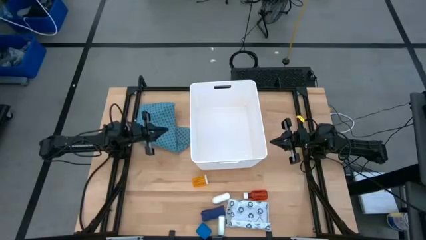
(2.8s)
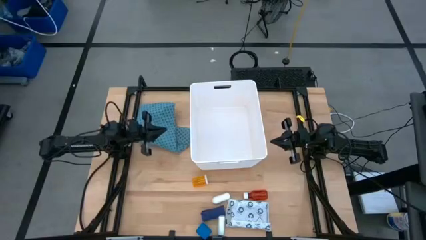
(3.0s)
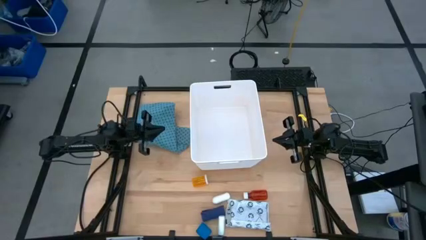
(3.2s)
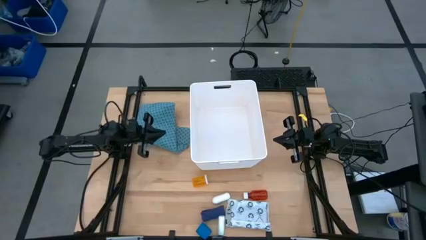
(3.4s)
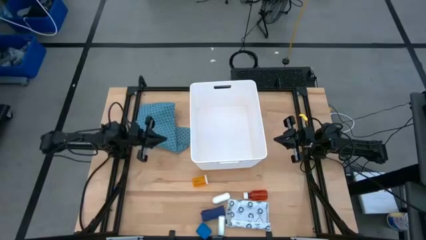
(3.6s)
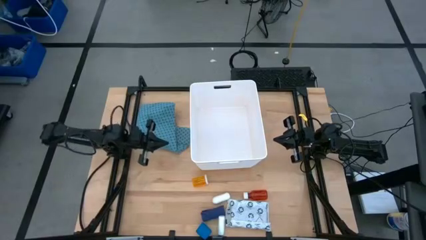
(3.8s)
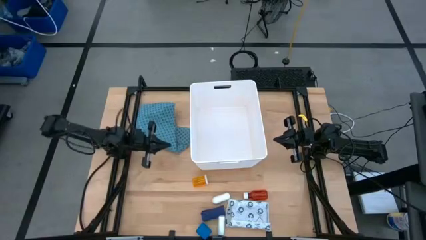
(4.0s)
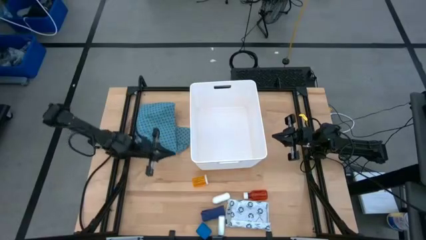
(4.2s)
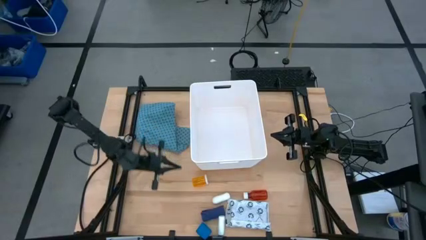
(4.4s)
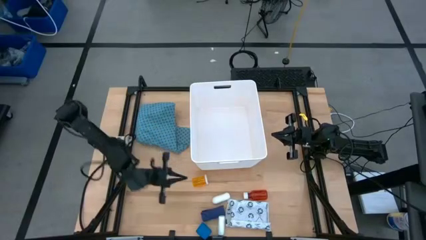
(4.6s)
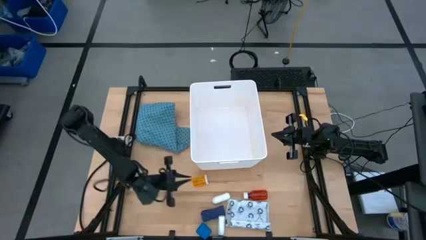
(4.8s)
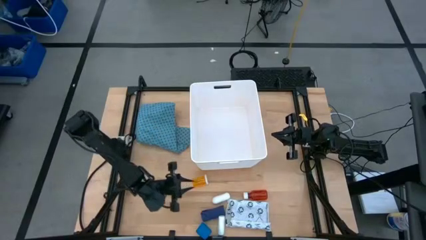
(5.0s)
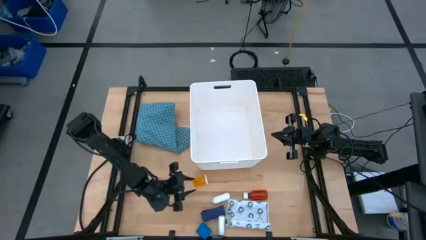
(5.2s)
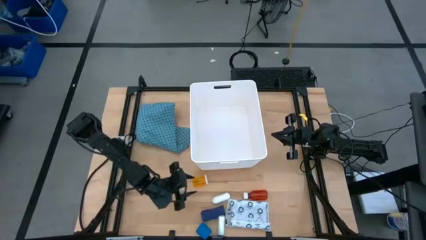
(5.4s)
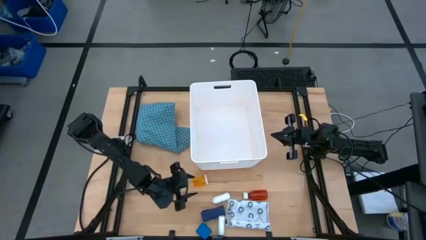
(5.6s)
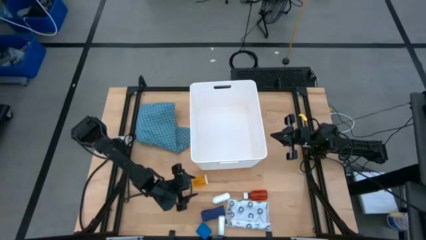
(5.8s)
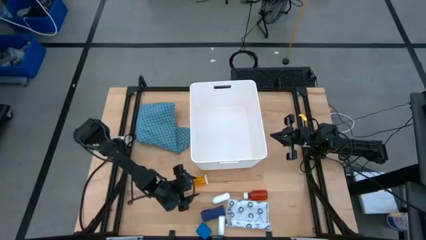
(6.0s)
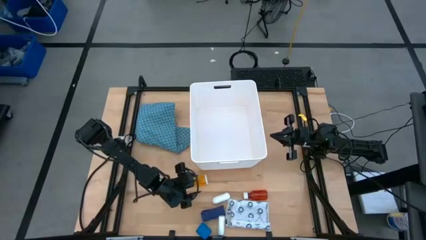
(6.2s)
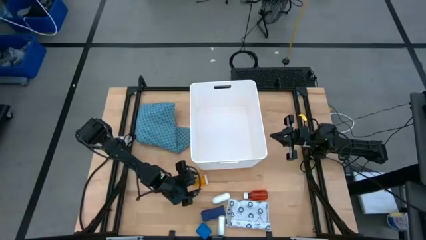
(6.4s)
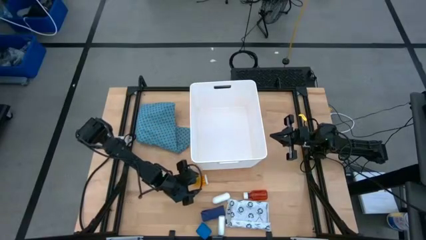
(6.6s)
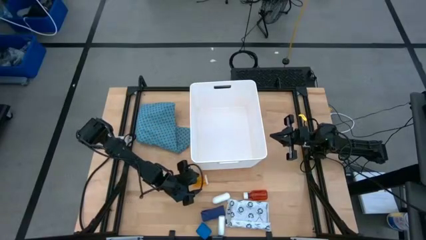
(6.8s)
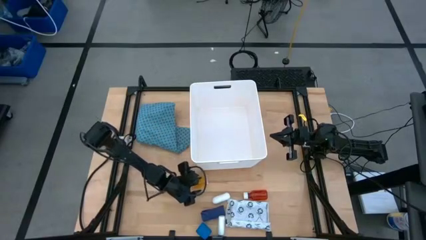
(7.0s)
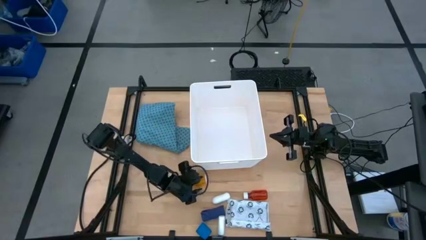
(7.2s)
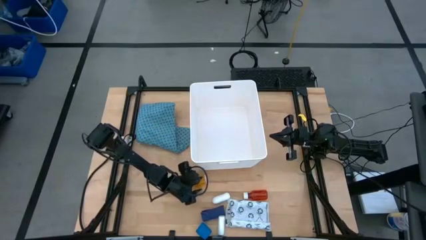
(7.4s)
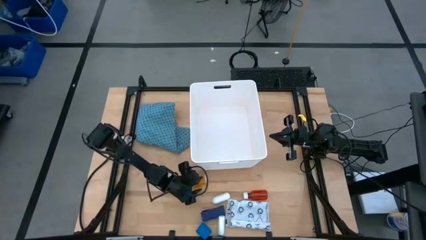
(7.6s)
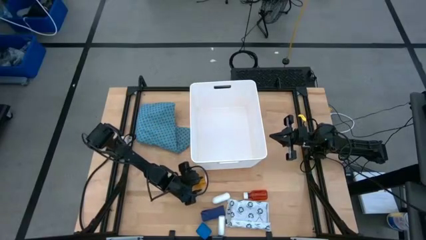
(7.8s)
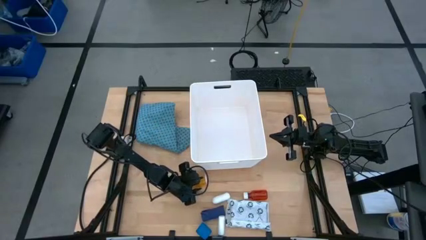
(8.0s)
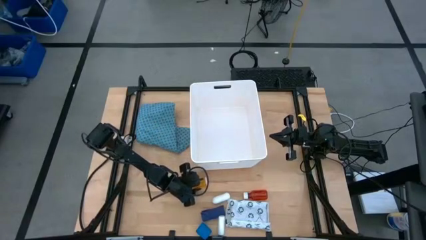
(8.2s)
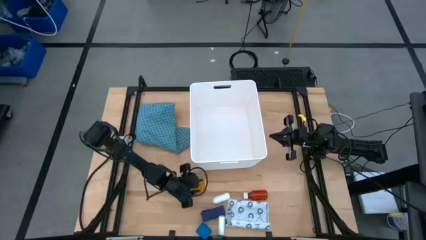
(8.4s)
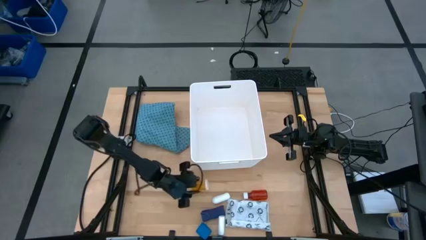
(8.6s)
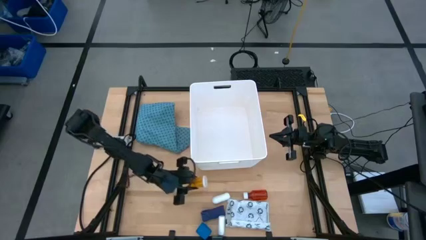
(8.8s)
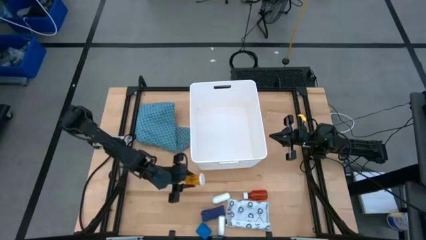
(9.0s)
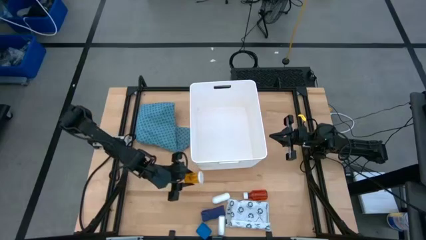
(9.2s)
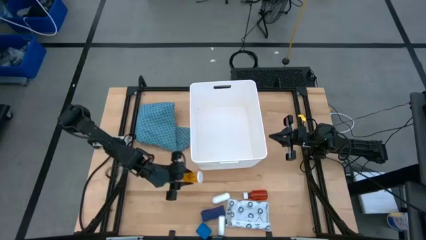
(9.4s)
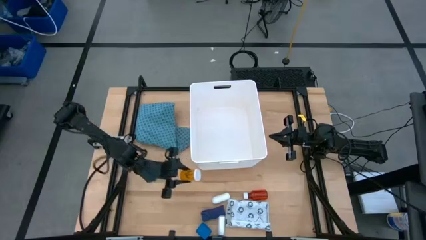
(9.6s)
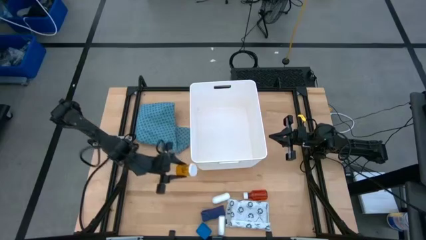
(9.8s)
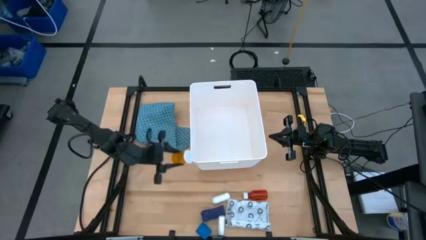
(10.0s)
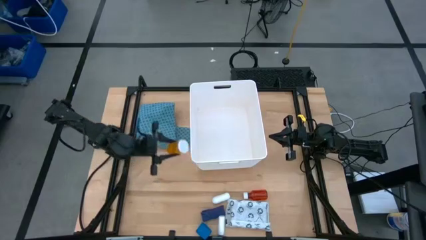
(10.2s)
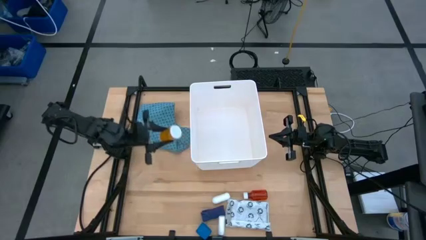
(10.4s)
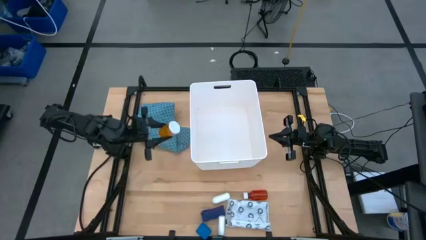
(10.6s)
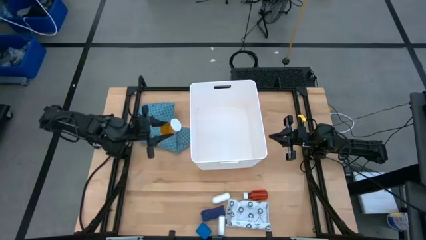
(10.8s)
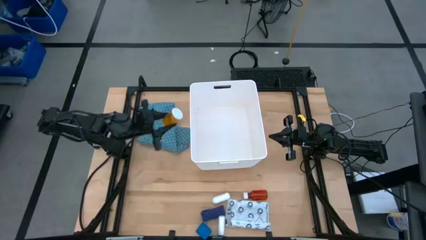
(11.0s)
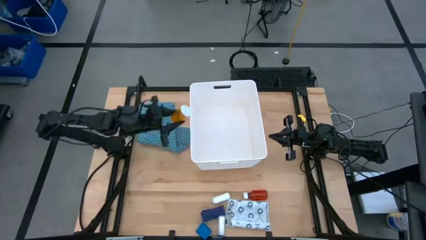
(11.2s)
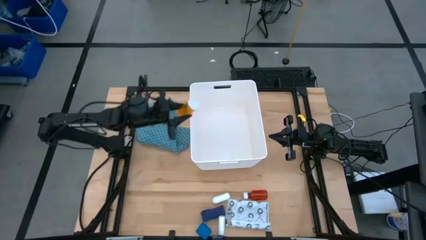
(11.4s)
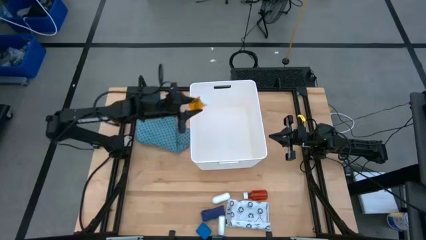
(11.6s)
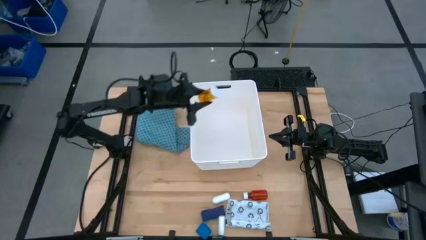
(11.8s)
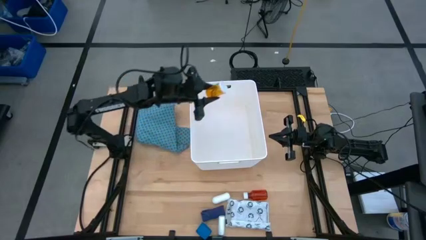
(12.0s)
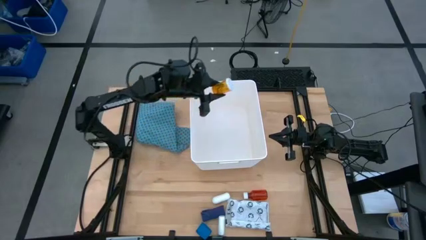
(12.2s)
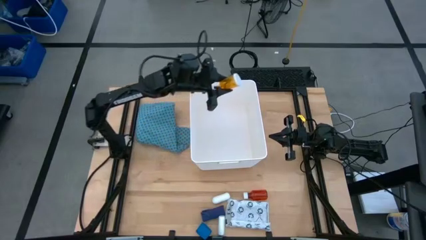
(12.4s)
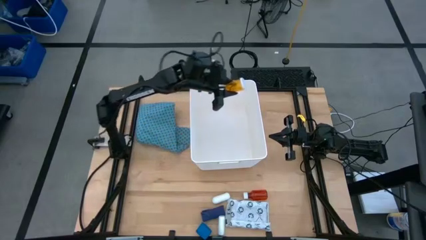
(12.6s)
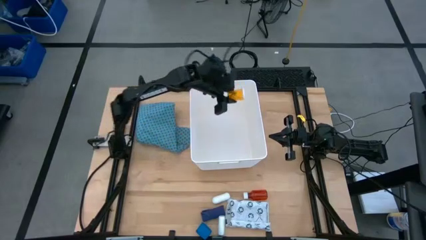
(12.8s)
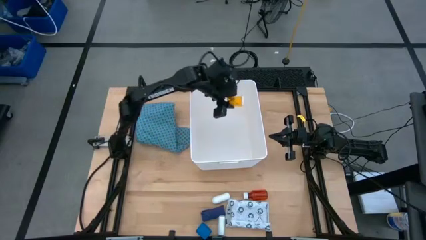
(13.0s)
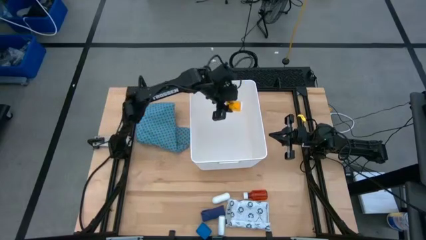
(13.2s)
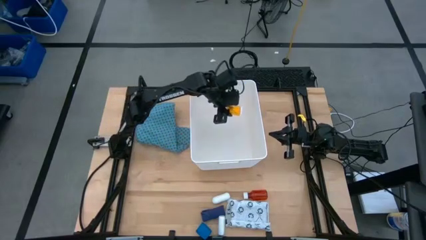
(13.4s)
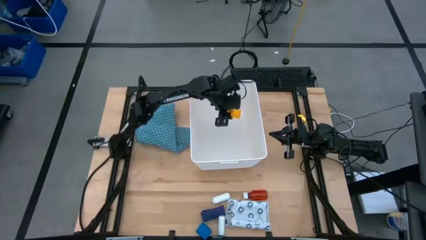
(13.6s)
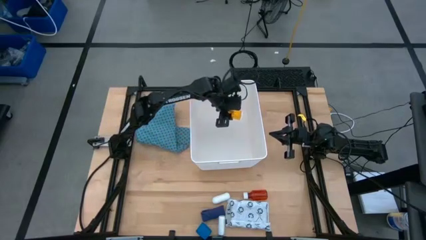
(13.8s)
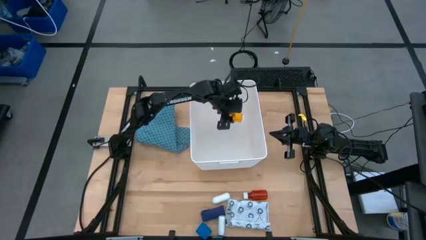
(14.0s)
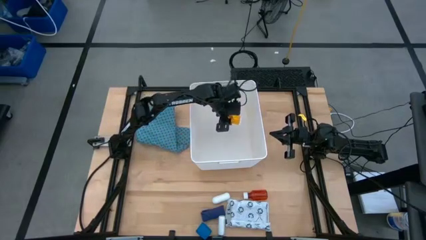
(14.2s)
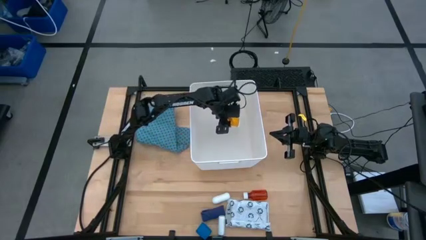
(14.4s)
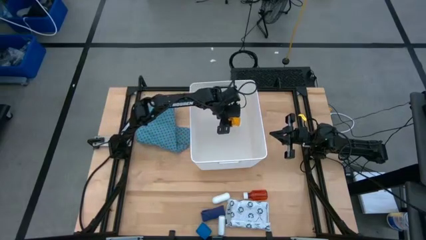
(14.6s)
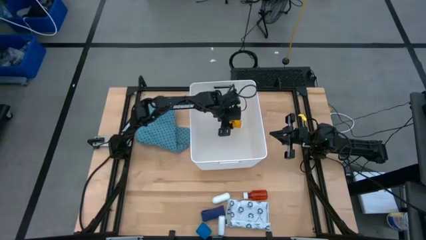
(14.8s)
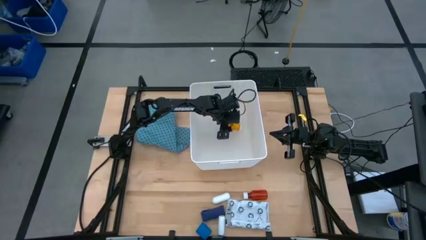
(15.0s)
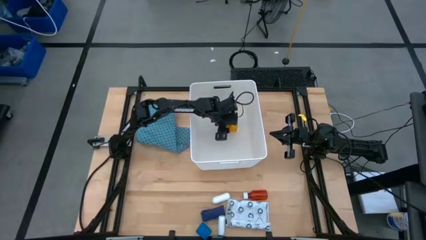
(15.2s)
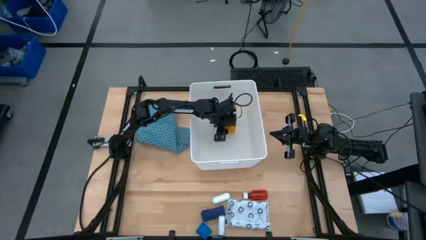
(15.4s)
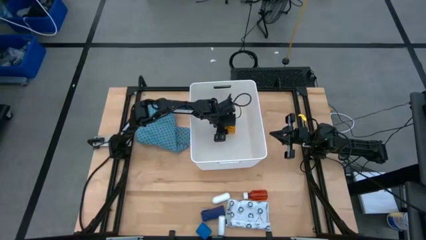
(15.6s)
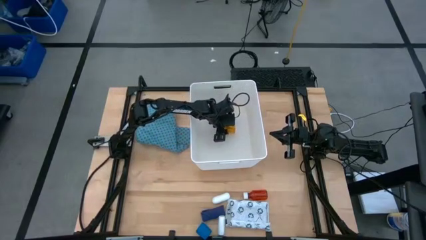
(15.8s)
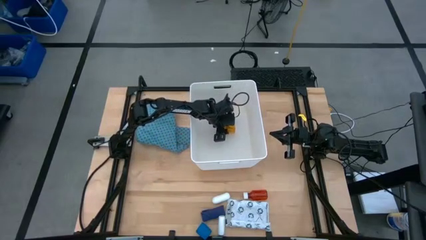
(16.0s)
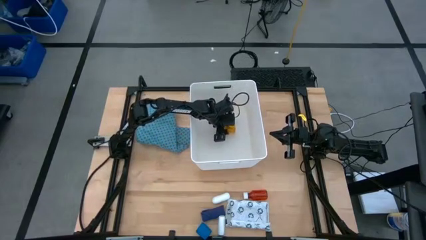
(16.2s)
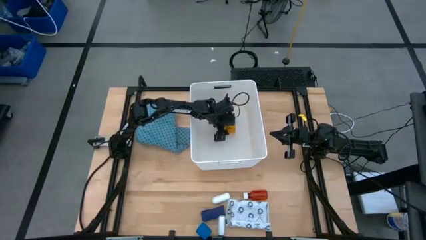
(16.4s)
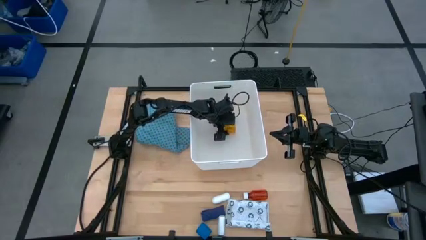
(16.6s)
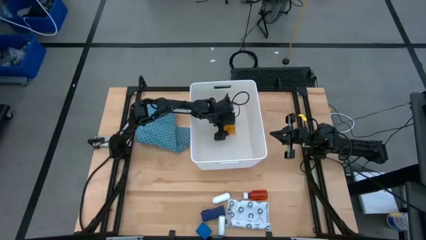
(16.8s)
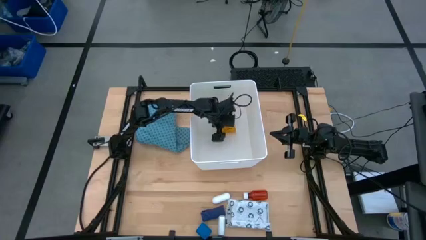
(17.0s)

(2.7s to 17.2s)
Task: Pick & place medical supplies in basket/bin
Put the pill bottle into the white bin
